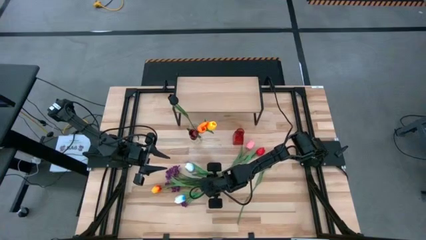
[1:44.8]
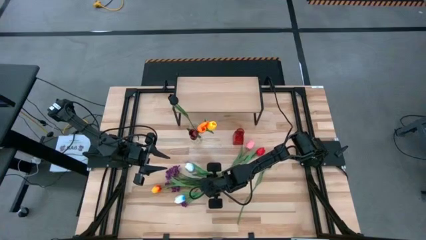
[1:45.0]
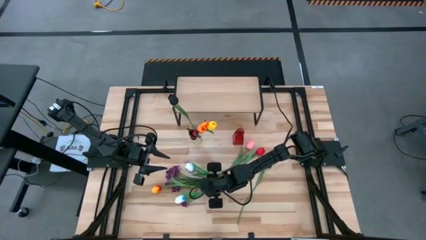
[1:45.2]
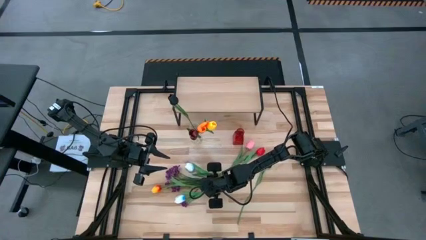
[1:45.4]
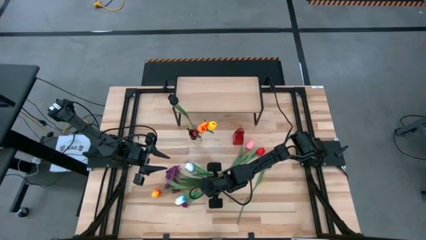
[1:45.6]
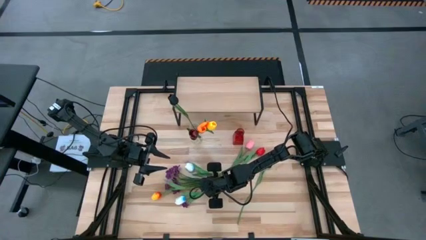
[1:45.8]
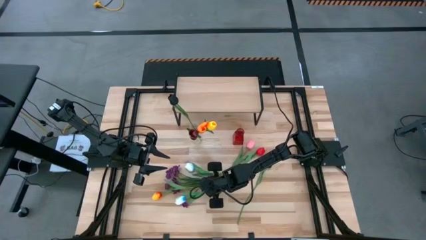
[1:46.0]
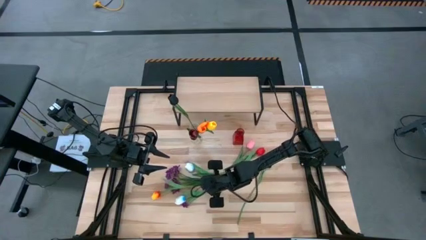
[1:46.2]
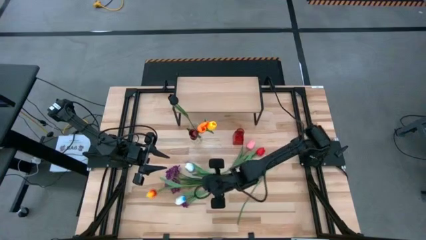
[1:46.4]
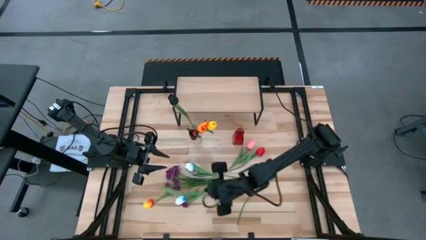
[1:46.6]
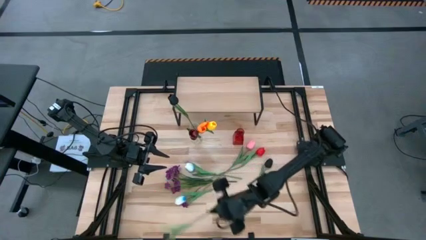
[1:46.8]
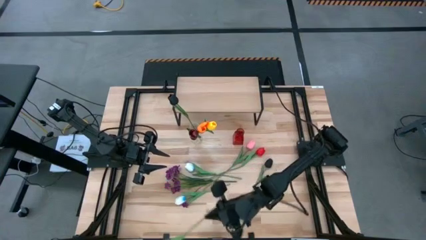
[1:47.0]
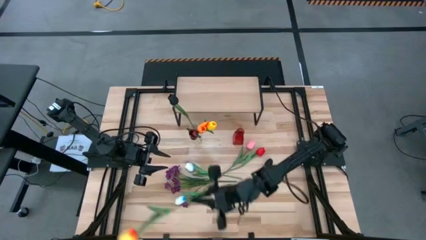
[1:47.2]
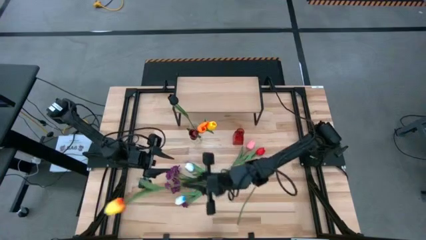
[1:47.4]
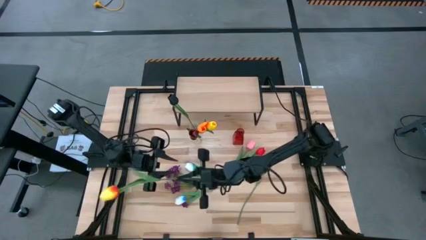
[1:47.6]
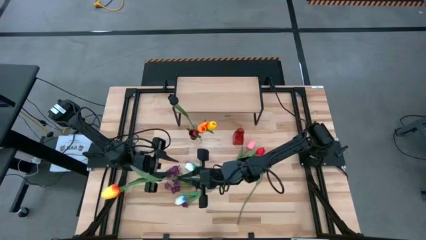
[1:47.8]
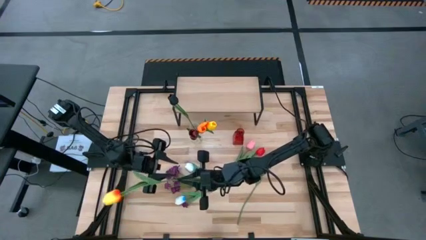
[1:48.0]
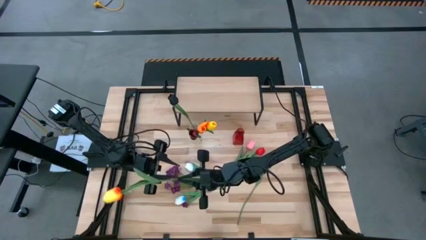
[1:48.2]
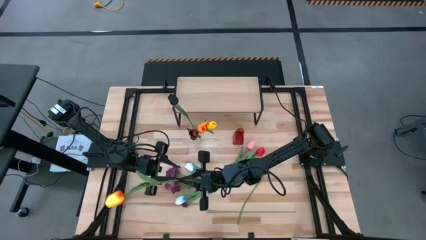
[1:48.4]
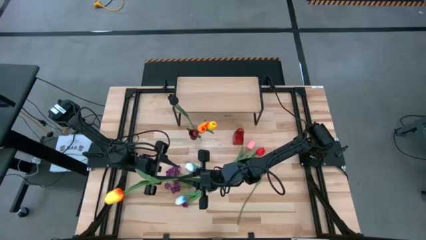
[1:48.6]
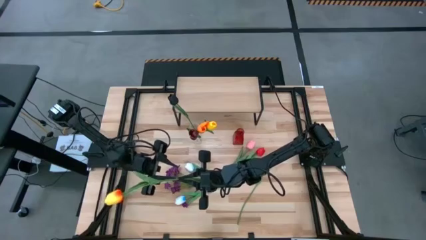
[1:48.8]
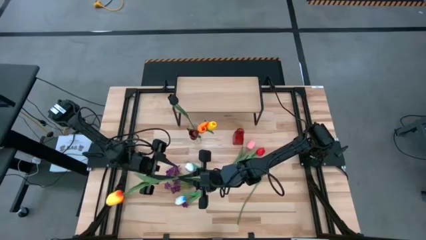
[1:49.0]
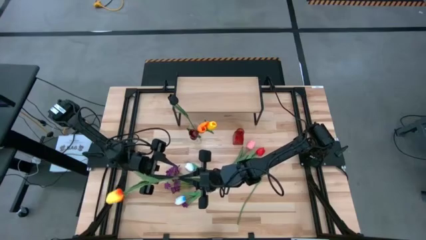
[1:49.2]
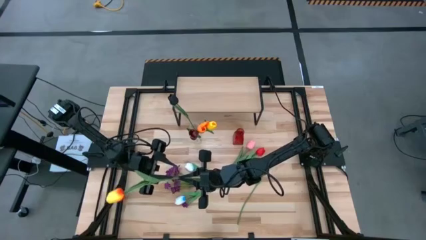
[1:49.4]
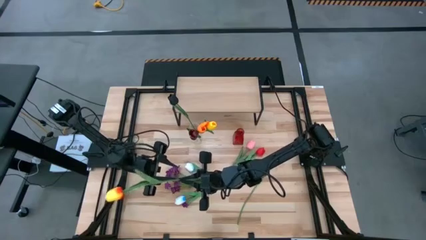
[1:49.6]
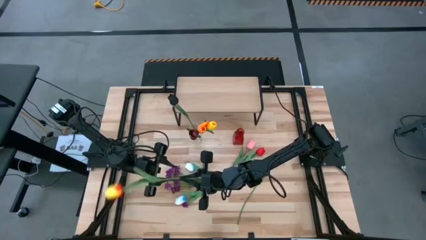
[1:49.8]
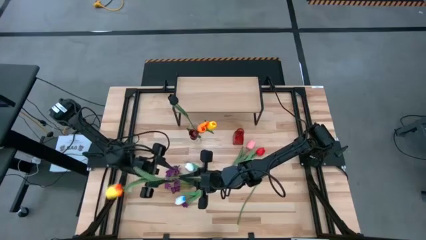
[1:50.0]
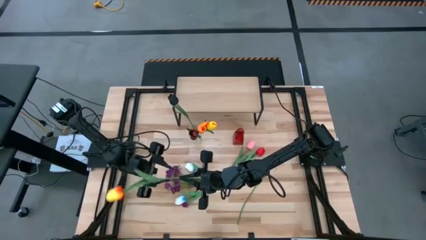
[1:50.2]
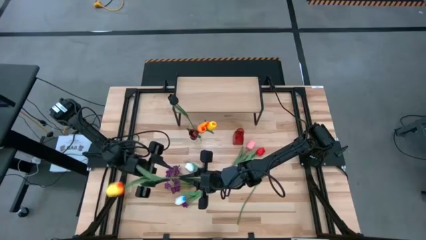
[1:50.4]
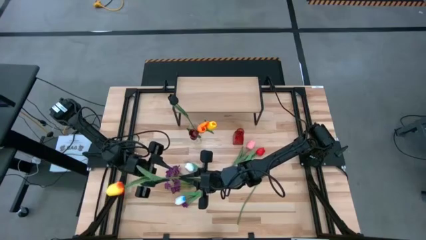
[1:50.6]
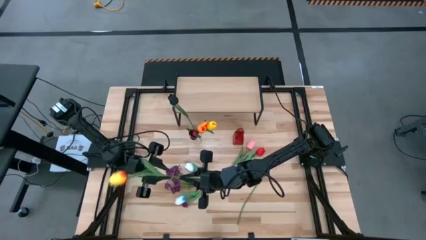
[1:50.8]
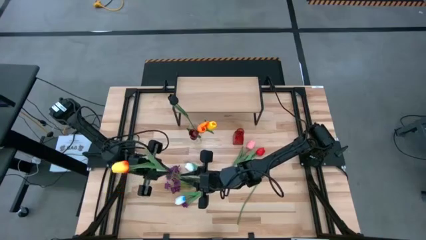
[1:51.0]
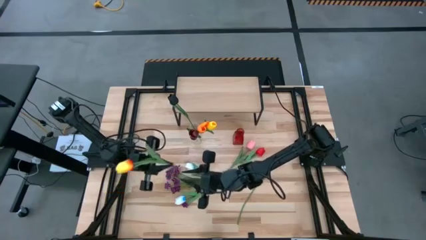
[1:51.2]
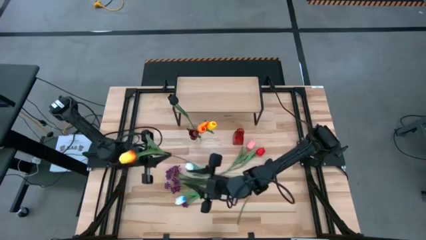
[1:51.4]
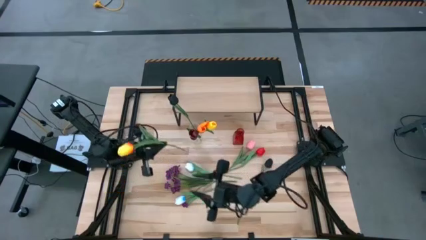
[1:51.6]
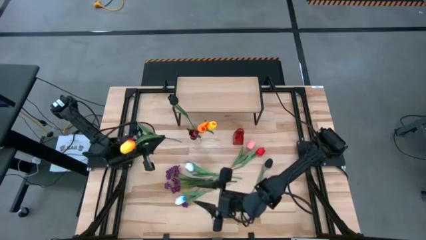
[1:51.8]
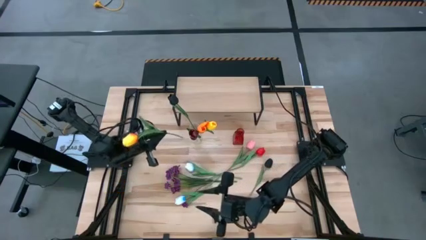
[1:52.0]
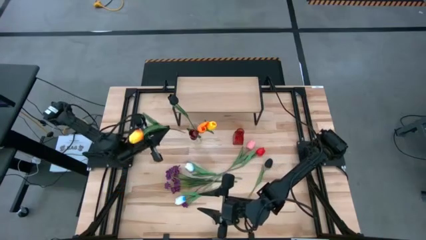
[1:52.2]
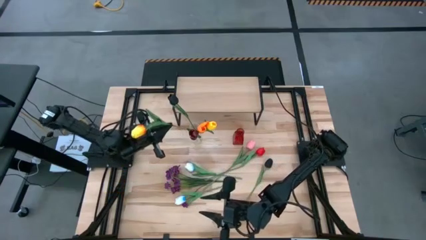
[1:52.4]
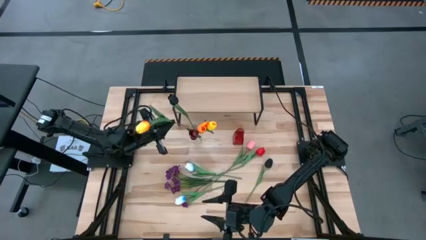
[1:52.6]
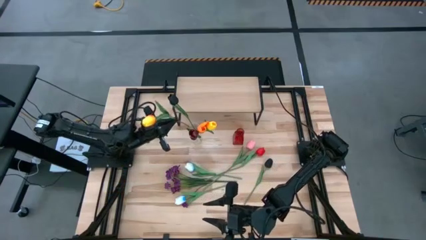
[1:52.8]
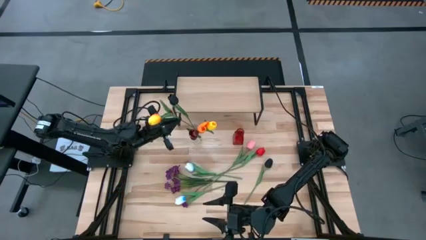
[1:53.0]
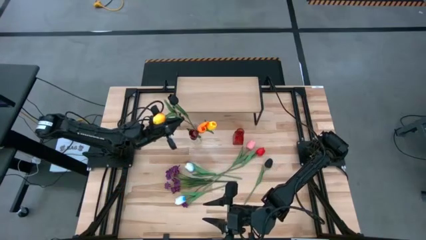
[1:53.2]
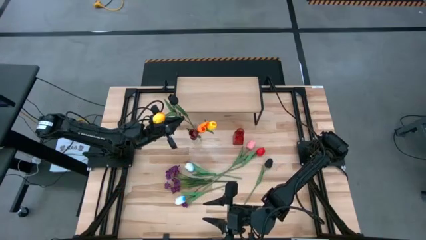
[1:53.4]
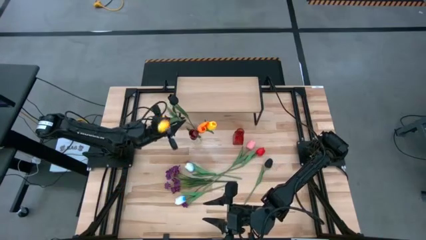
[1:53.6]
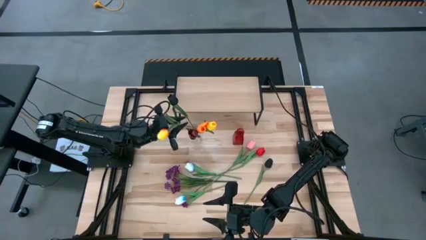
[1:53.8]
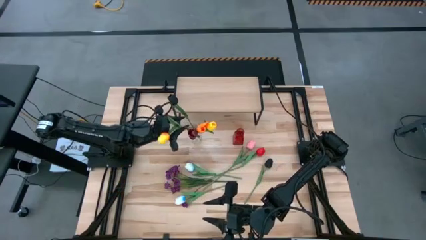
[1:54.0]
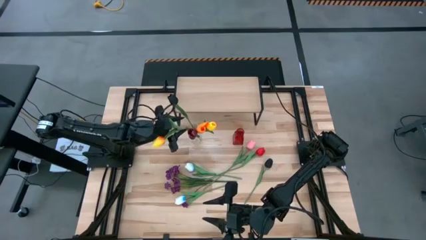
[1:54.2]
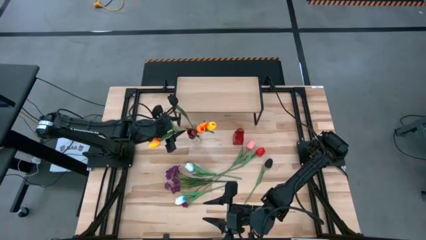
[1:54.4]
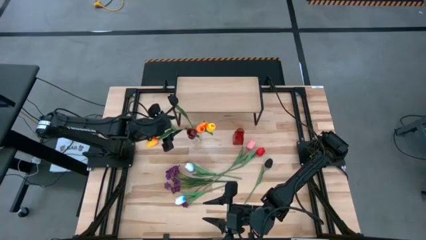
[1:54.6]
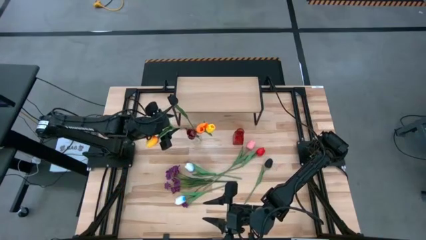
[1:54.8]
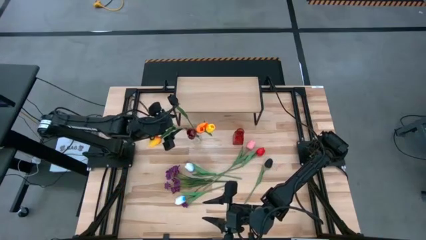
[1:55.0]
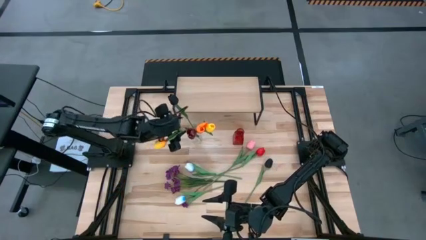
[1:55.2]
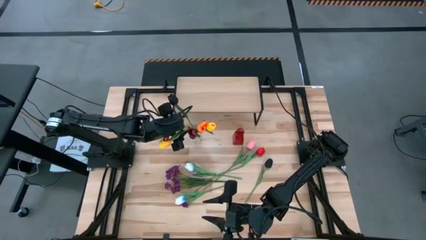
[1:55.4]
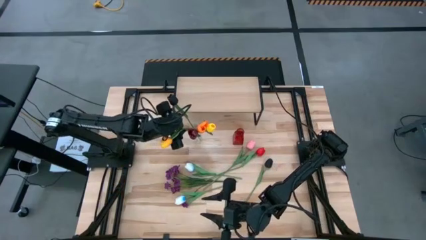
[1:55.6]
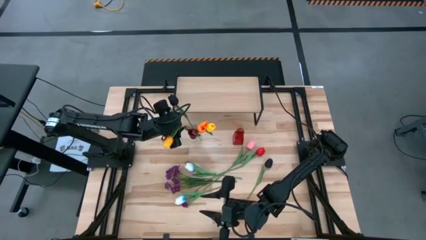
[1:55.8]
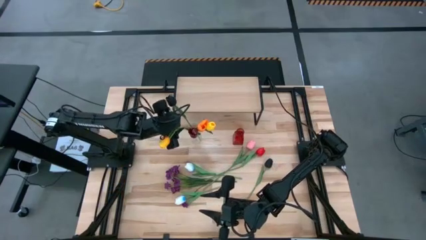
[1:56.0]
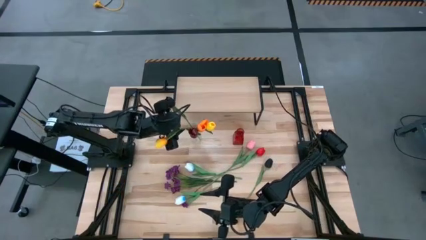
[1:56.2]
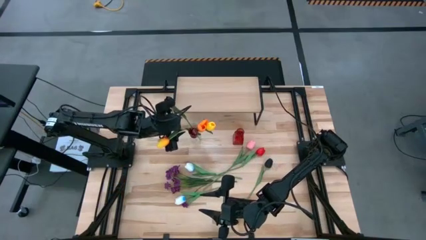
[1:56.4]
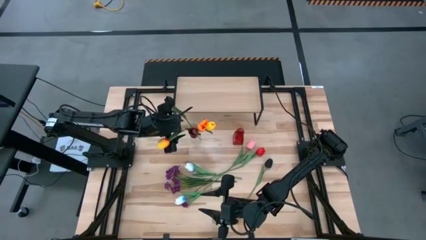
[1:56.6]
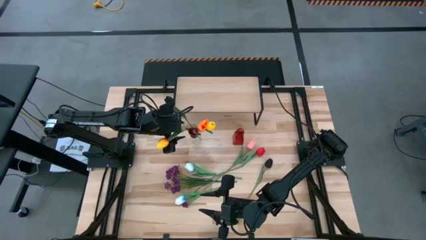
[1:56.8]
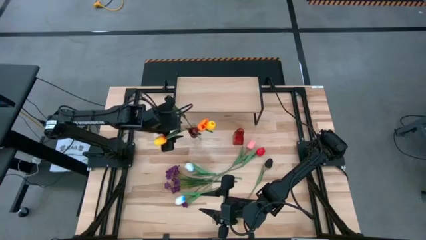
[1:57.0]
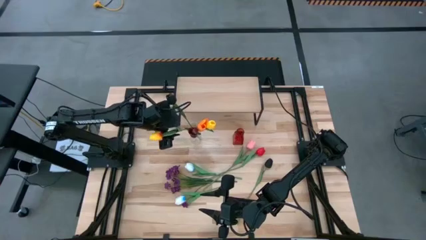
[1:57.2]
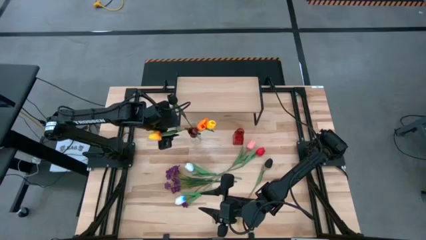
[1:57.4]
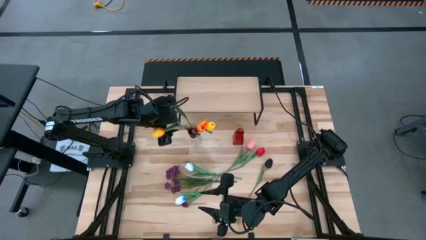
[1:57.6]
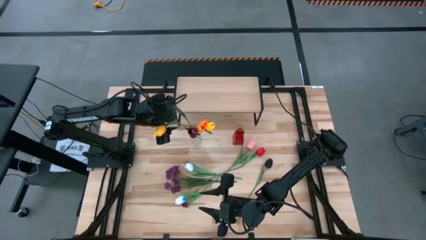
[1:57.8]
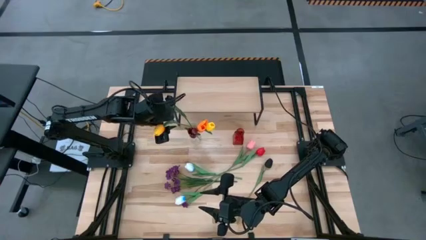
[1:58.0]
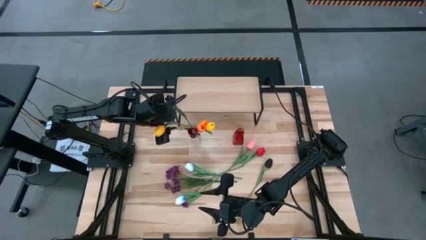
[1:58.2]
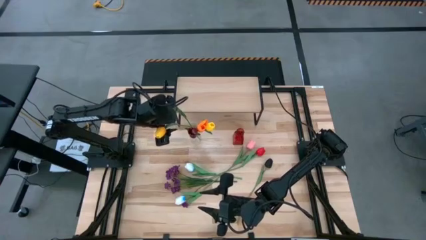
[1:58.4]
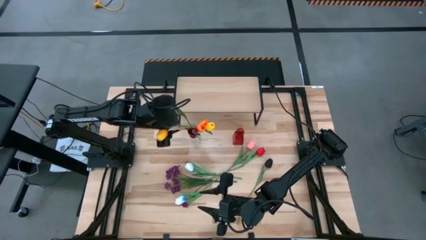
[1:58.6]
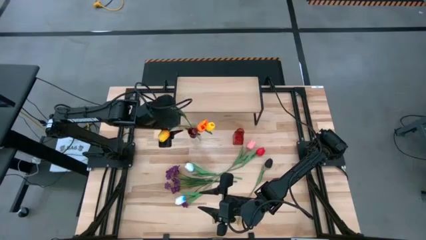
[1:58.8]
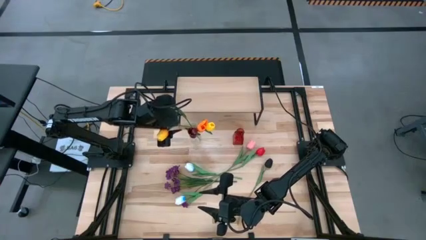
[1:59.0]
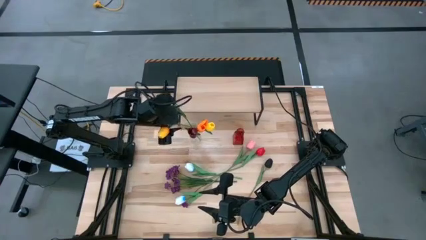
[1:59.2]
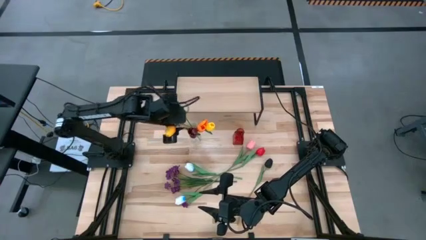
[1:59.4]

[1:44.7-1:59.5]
Task: Pick and place flowers into a vace then onto a shelf
Put the yellow tulip into the transparent vase

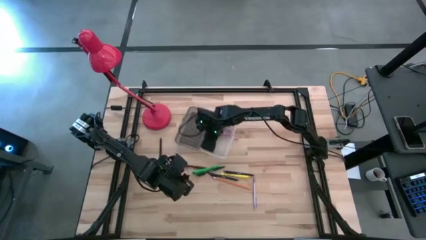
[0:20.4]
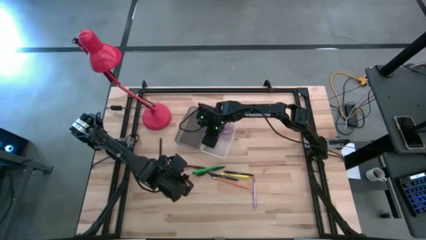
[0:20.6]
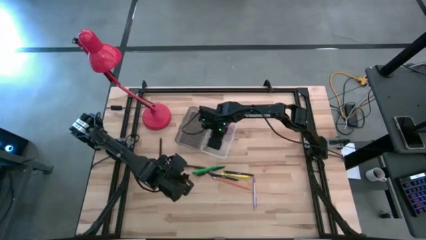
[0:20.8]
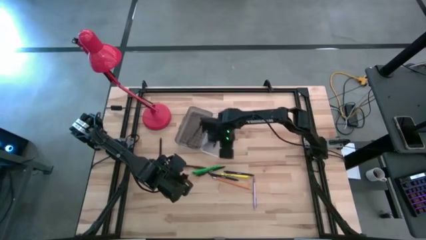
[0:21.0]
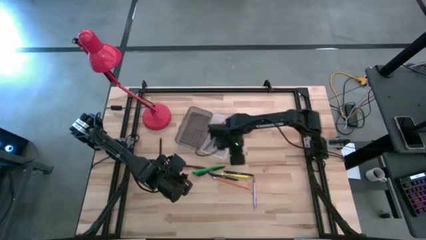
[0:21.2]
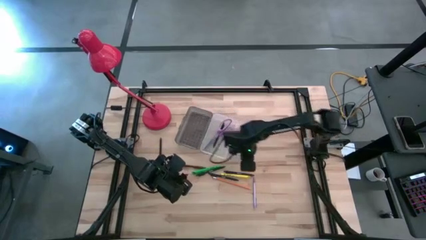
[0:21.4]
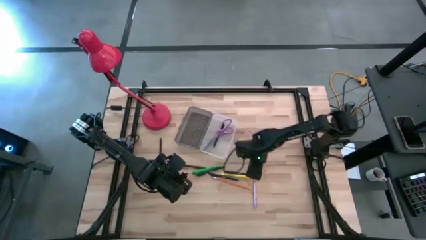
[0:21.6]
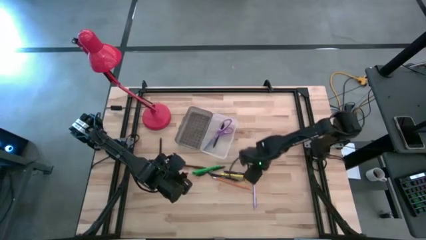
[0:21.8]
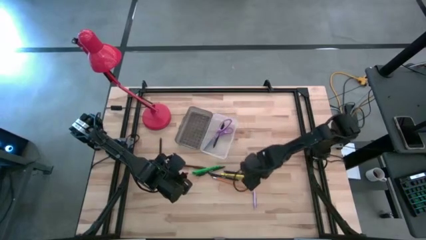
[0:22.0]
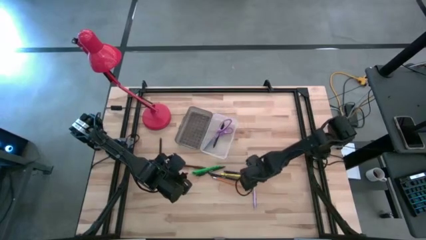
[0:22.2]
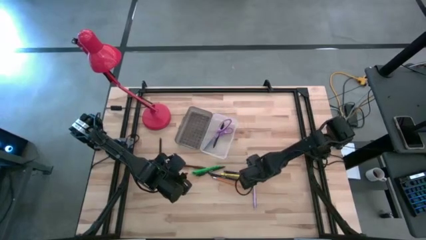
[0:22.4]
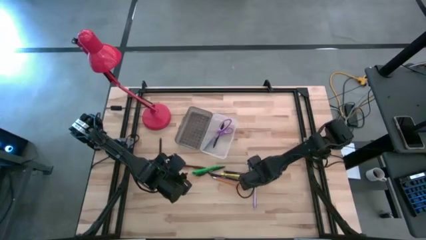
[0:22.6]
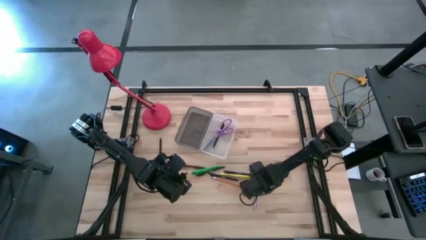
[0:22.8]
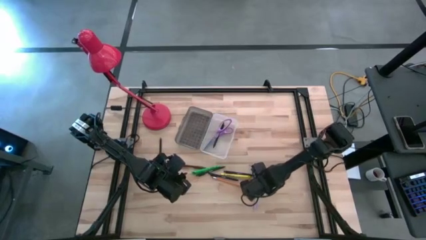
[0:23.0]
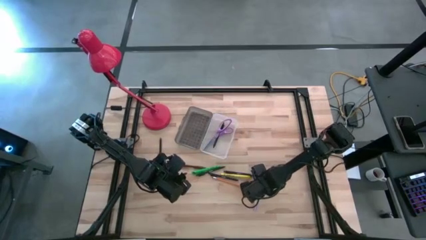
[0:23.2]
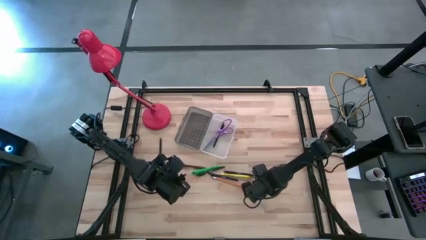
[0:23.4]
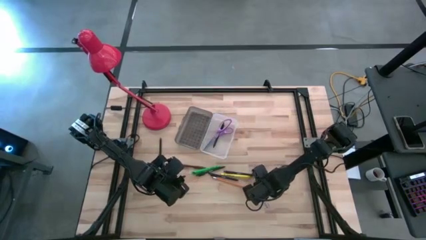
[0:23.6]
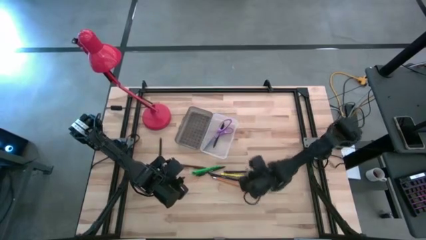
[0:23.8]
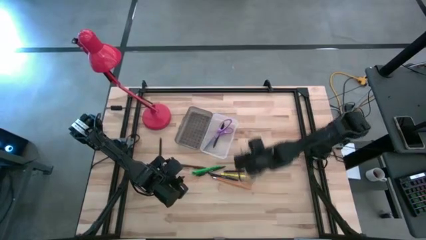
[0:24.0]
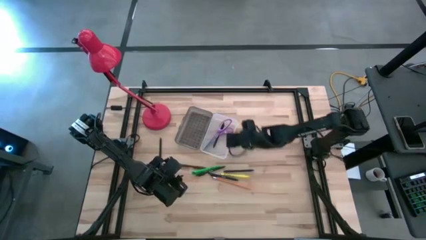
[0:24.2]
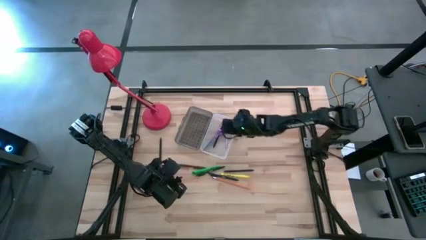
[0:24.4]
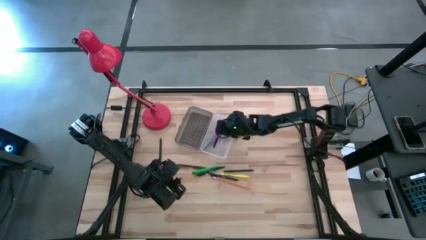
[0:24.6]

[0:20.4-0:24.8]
Task: Pick & place school supplies into a supply box
Put the purple pen into the supply box
